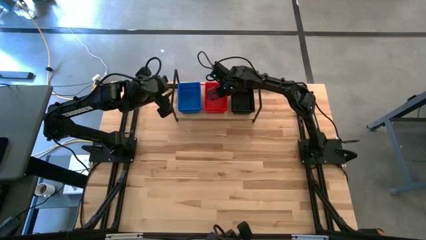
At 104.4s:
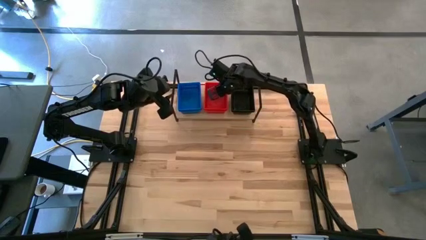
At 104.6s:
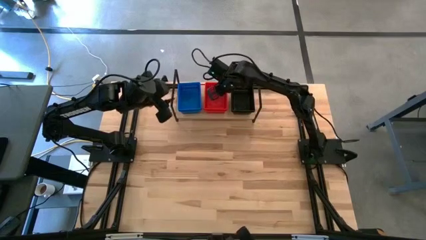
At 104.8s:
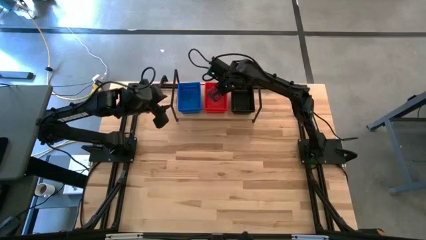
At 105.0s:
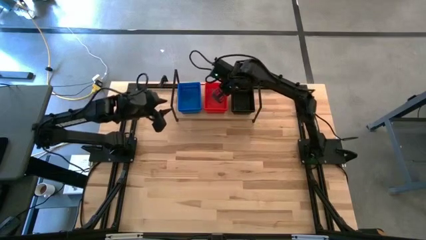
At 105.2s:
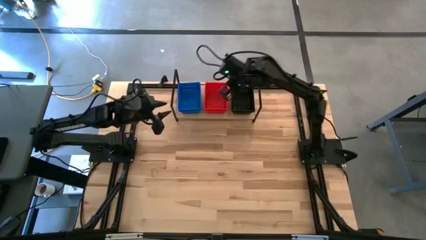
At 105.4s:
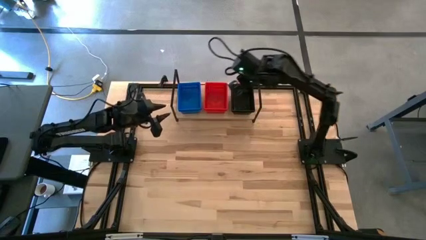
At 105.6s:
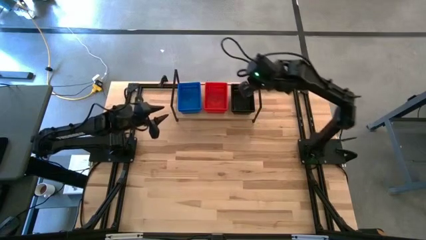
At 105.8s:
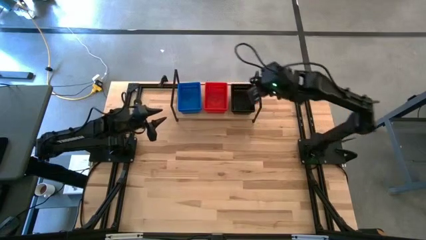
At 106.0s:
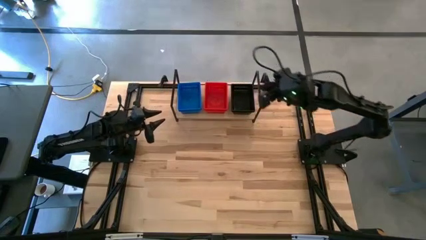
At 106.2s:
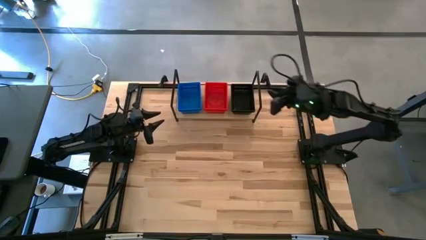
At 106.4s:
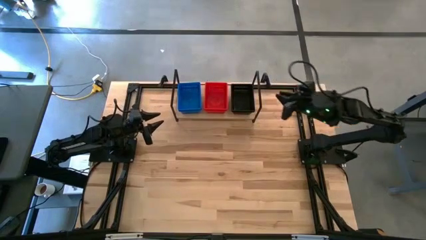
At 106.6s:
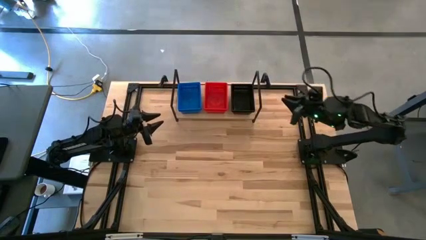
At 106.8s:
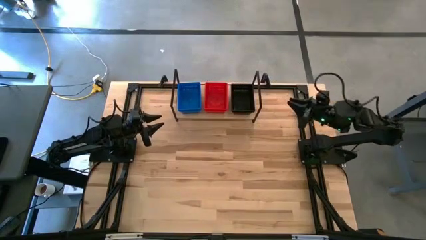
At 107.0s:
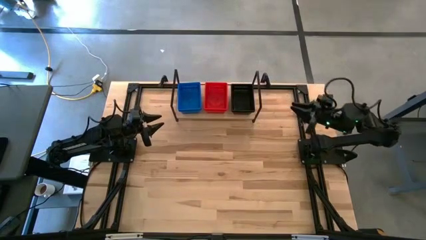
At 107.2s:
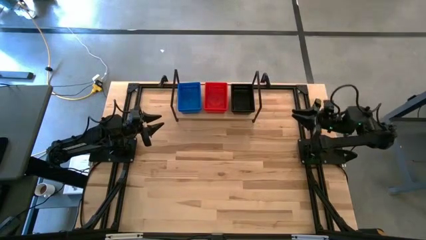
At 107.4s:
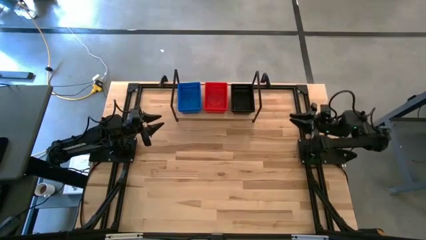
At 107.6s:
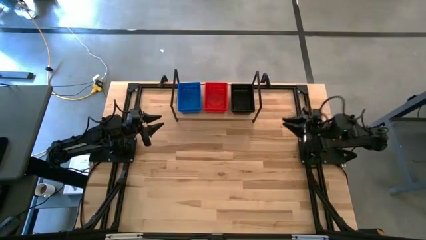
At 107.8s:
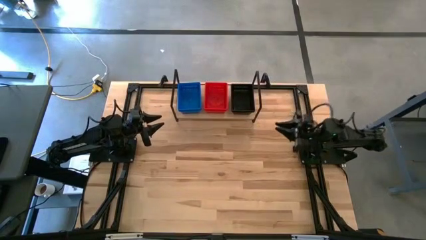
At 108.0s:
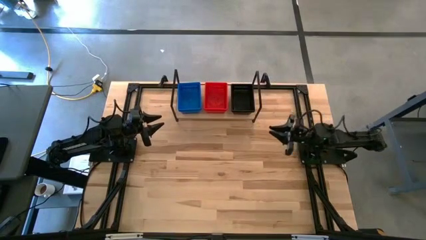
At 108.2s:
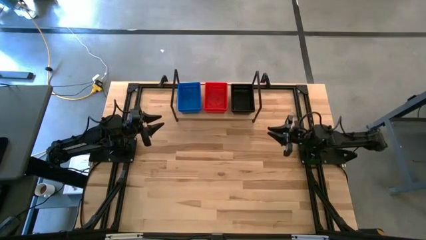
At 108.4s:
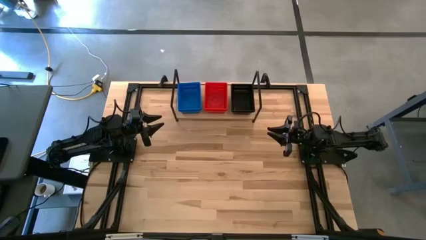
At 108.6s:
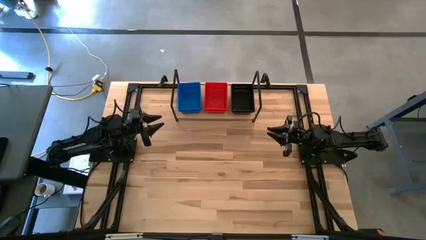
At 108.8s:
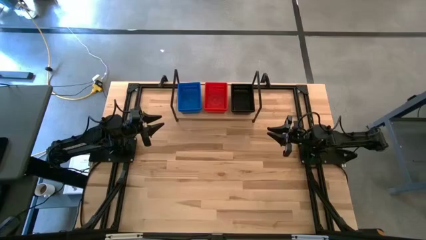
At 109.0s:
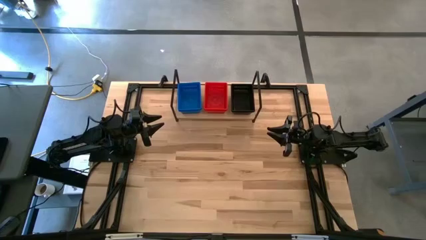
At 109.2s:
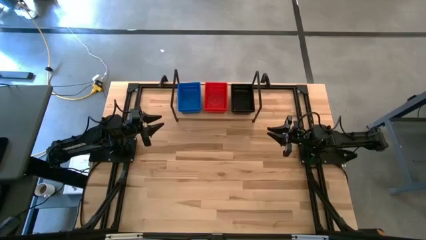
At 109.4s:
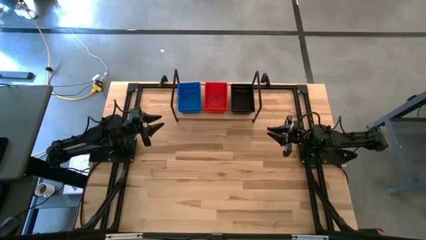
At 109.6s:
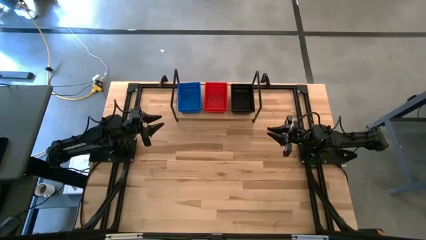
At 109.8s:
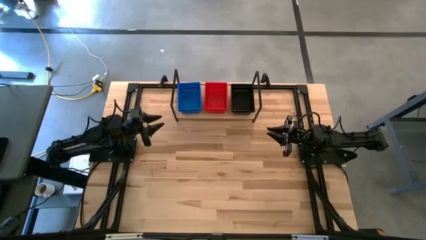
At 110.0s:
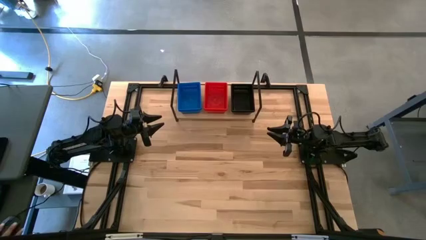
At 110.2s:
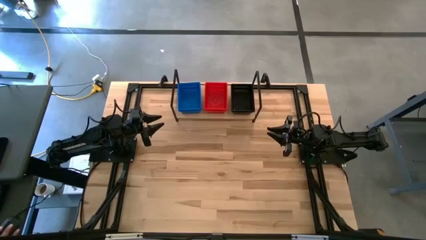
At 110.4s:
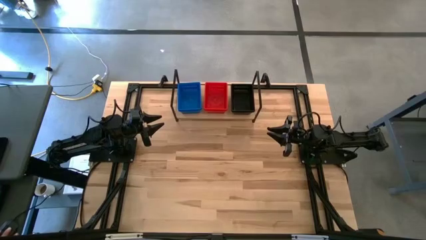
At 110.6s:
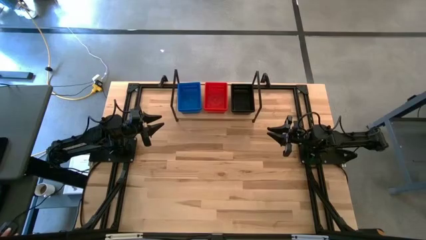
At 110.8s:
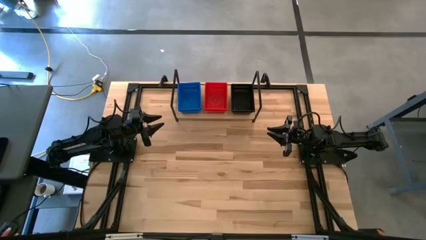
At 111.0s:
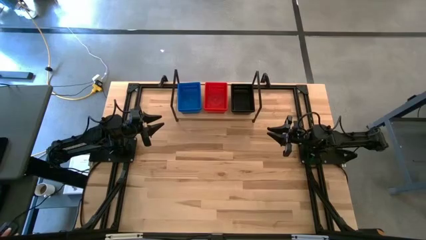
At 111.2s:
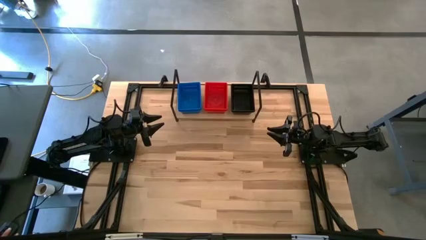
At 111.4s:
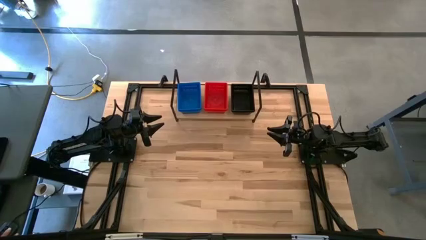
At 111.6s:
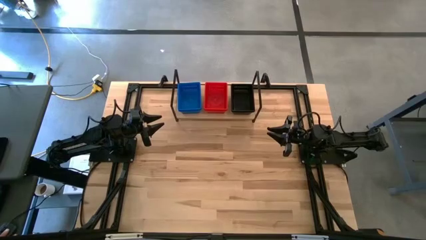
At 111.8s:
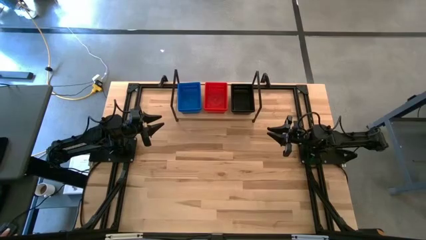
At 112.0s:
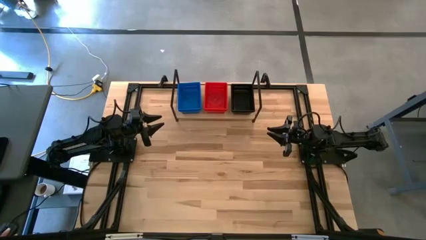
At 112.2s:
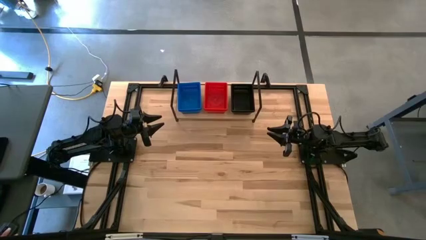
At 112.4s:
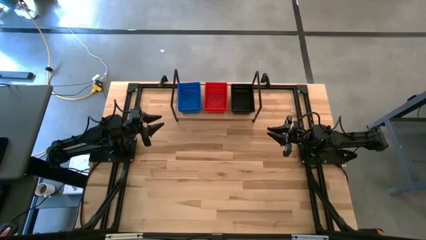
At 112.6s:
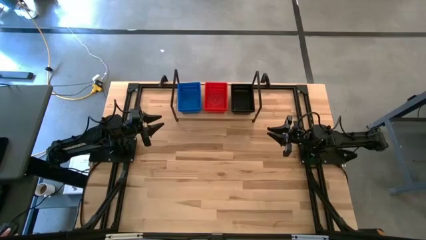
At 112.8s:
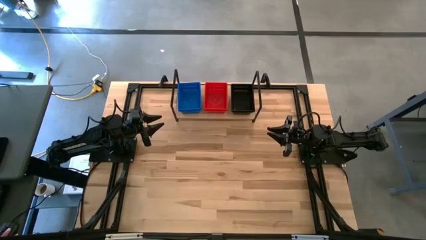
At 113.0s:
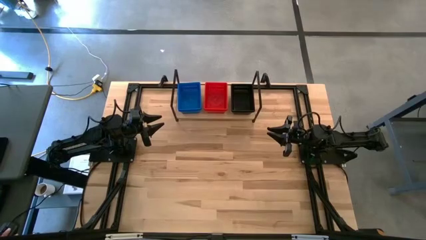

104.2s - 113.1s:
Task: Stack baskets on shelf by color
Return to Home Position

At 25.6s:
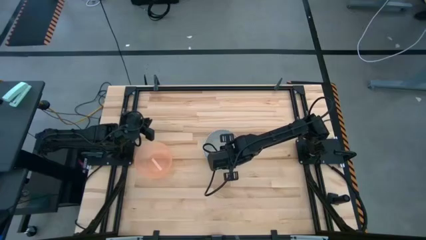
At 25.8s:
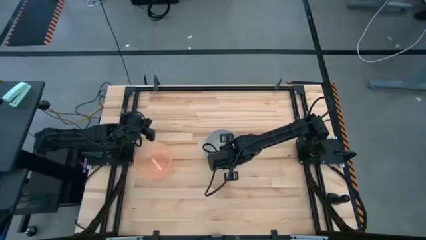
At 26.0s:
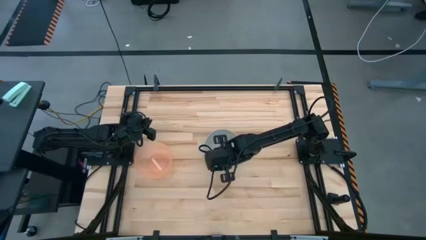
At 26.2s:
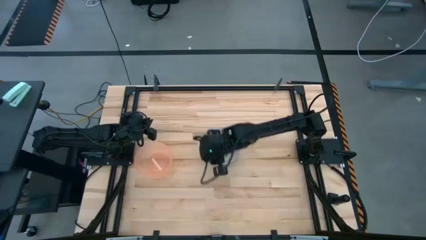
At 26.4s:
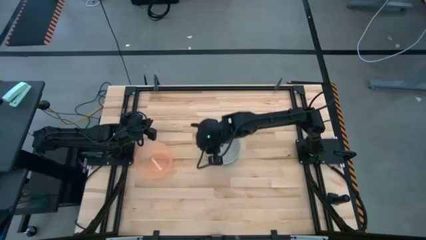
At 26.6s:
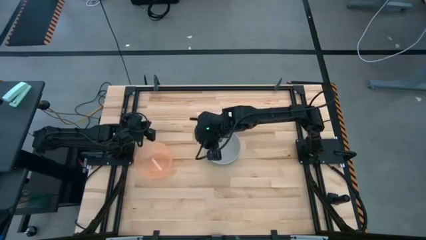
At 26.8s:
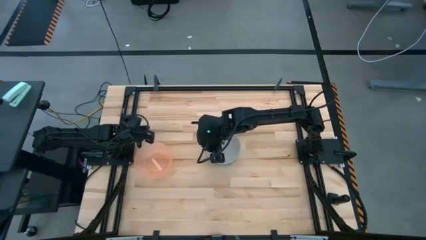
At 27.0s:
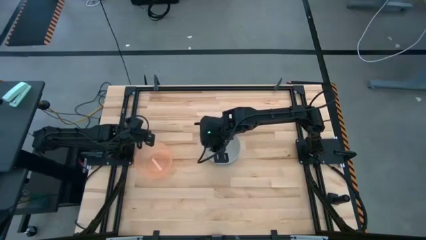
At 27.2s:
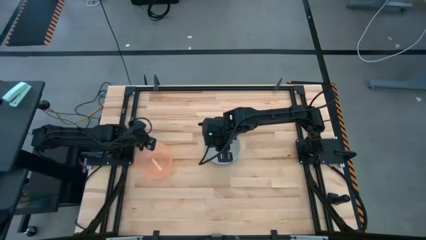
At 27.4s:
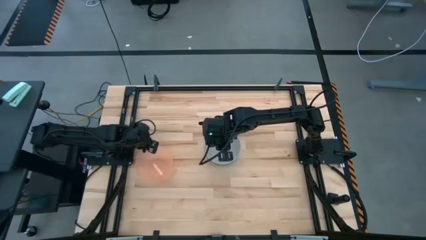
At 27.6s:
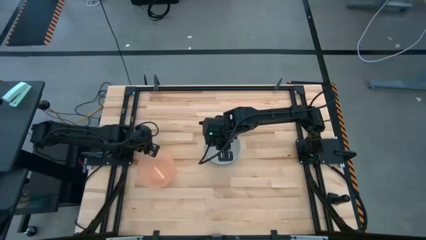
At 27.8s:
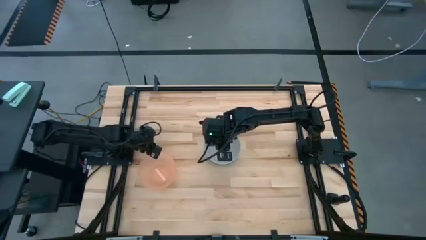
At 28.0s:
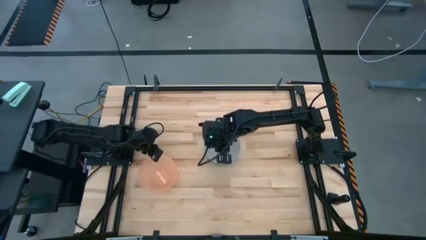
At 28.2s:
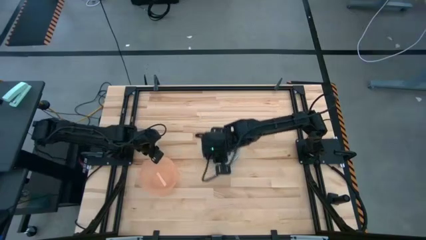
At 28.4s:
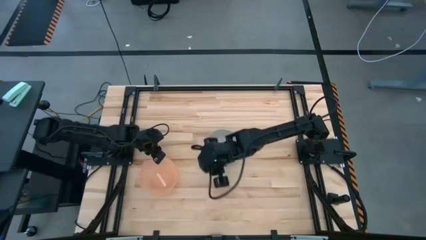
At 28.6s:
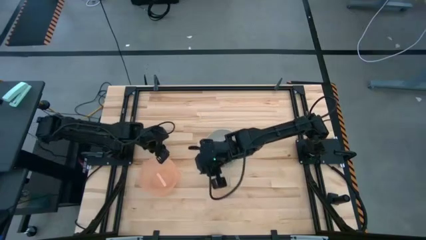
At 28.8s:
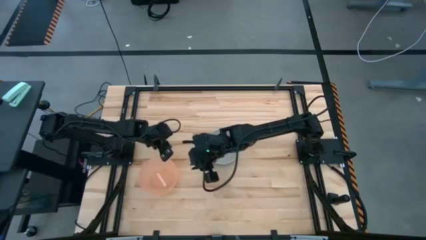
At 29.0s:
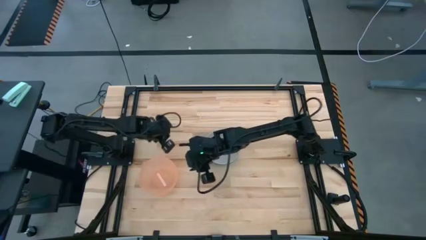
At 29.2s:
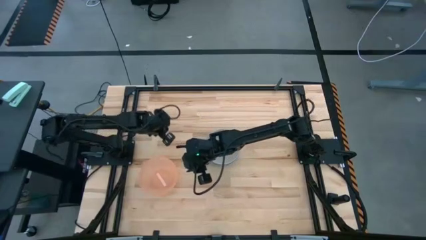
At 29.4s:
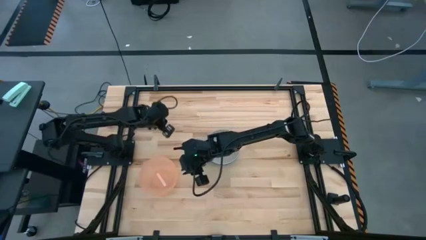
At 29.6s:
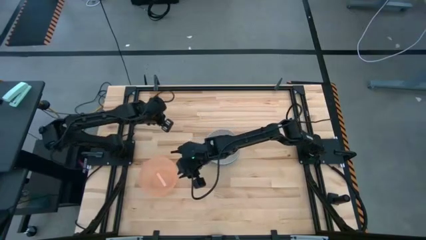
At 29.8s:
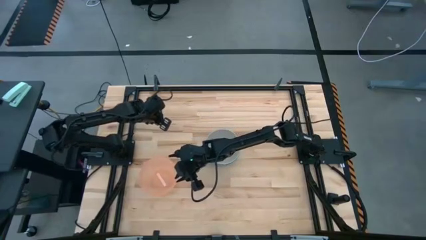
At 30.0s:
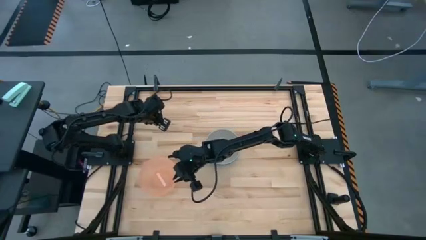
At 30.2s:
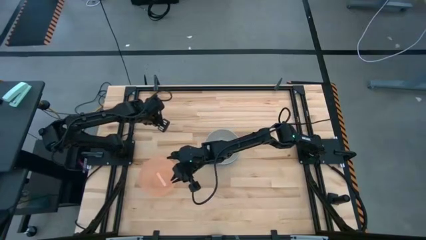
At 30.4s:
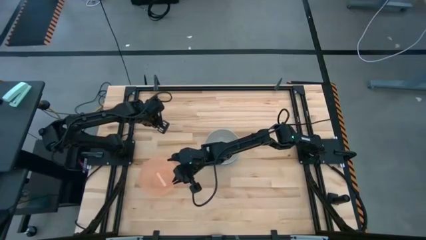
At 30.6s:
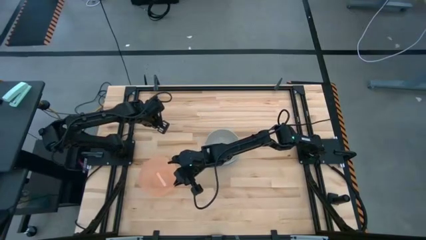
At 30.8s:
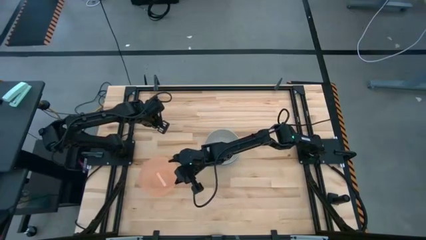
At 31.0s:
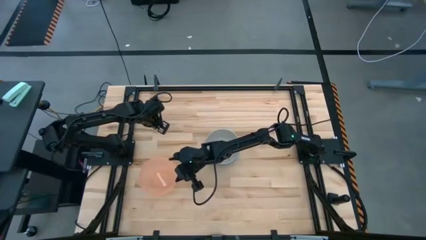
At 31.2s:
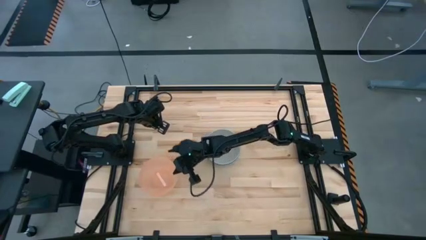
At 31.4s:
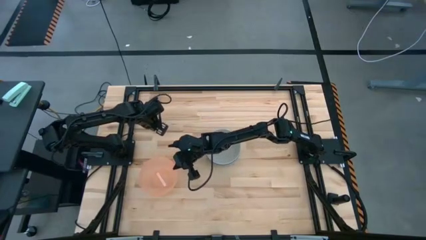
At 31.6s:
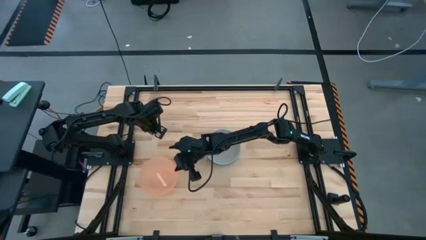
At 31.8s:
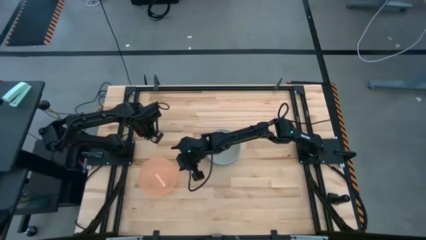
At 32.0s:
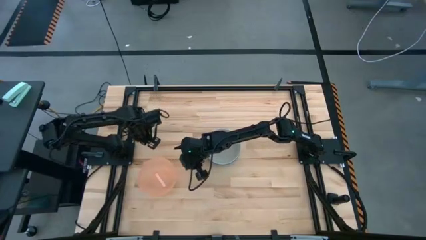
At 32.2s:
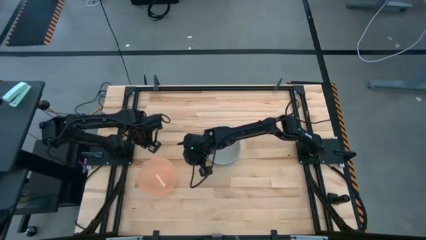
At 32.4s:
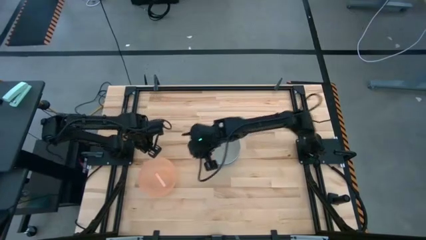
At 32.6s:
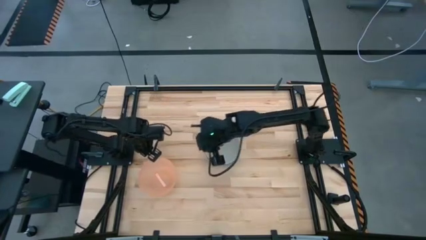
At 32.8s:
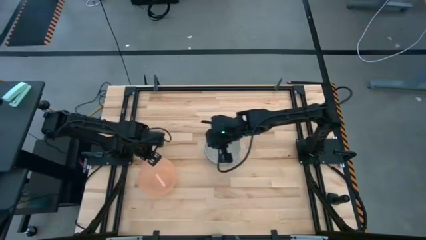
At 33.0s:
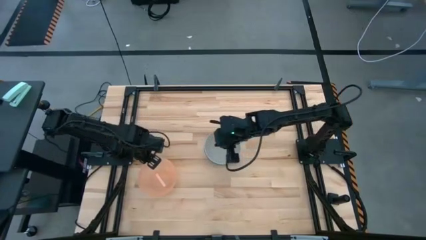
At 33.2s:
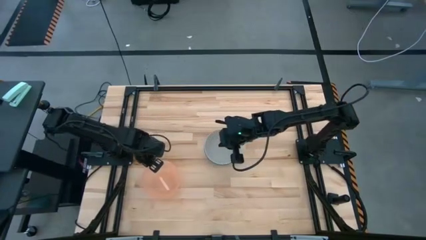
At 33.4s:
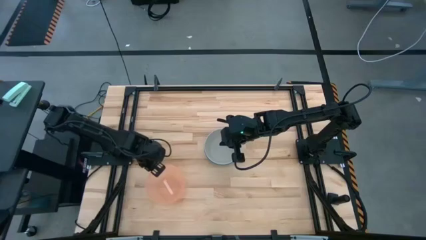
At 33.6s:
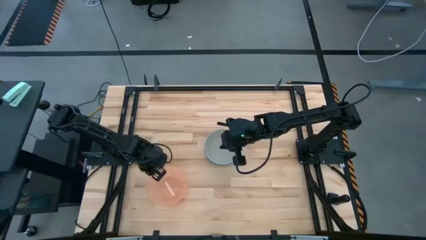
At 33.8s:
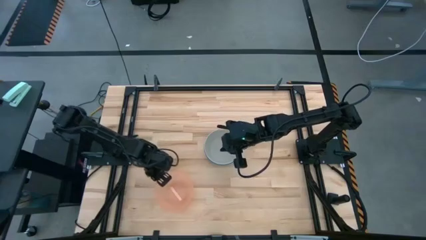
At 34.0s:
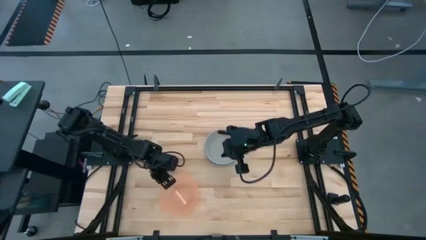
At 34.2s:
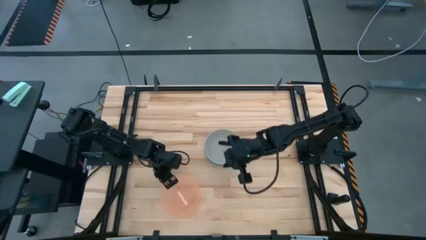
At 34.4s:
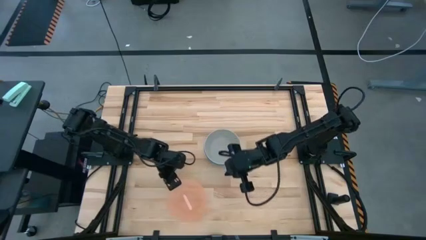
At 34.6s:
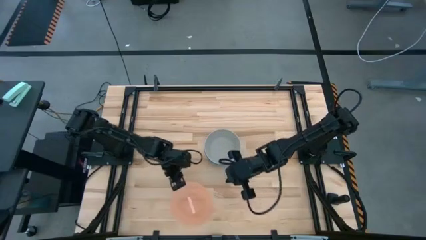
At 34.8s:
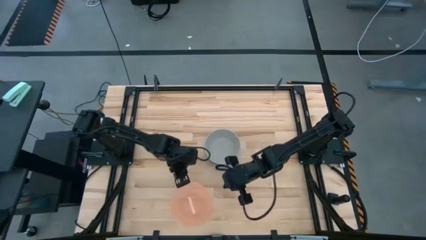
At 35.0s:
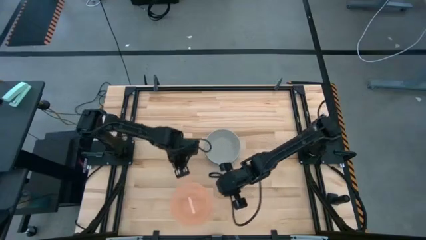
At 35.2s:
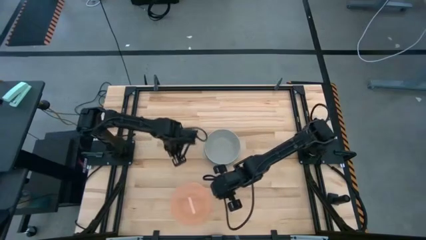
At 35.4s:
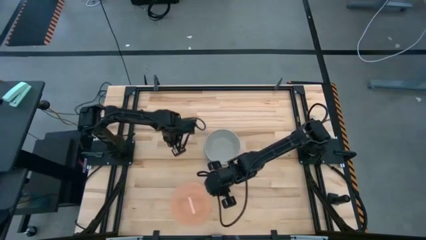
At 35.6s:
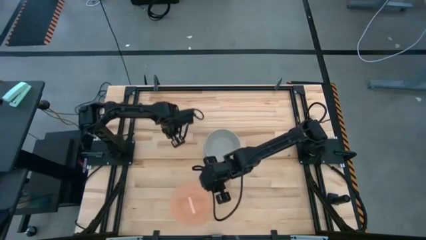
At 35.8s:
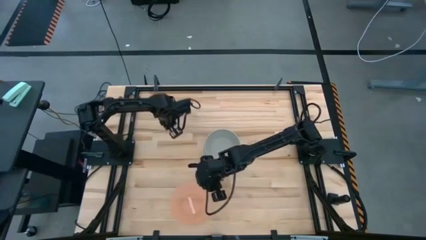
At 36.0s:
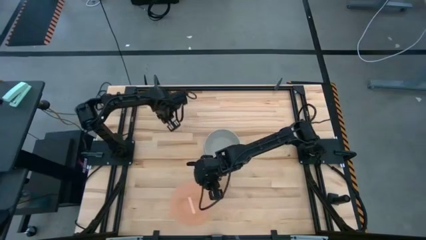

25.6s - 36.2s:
Task: Nest bowls inside each other
Stack the orange bowl on top of the gray bowl
